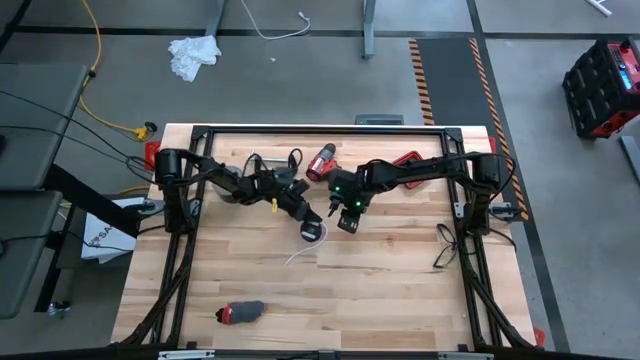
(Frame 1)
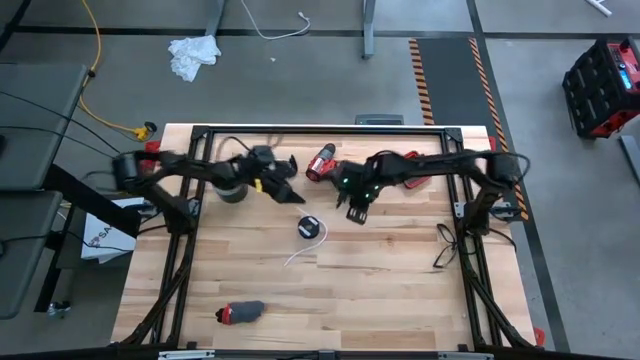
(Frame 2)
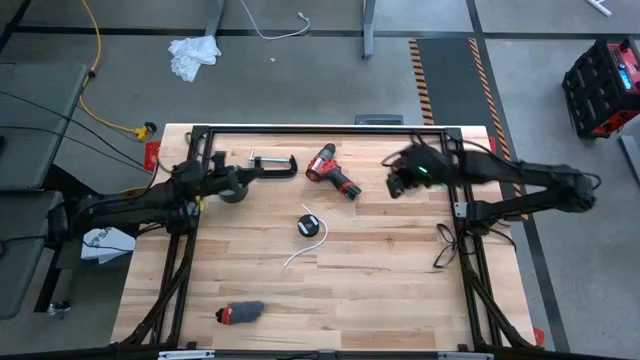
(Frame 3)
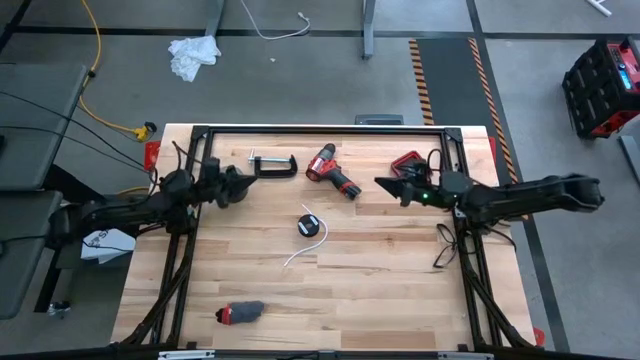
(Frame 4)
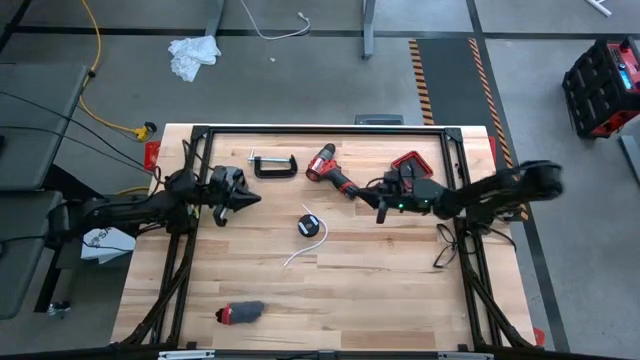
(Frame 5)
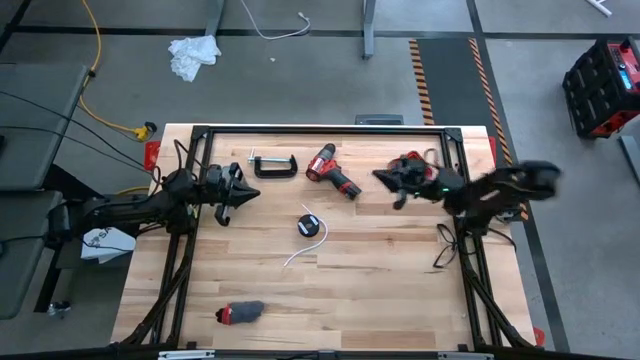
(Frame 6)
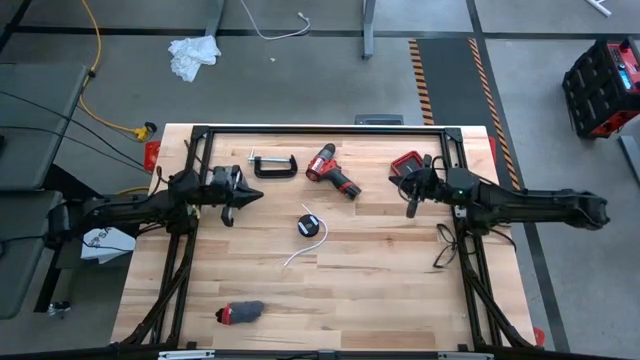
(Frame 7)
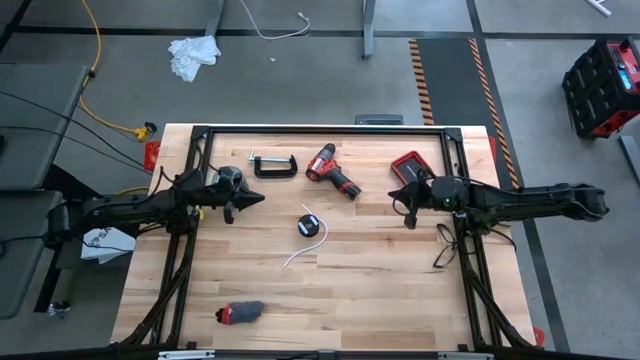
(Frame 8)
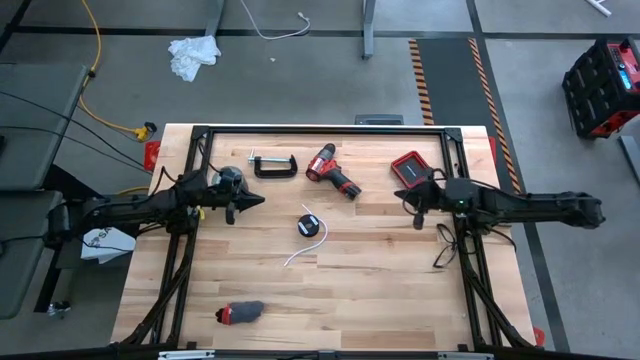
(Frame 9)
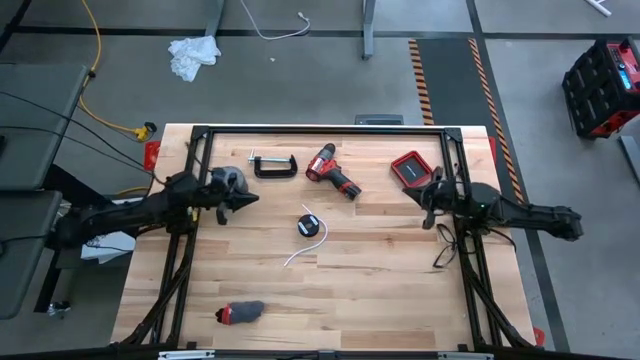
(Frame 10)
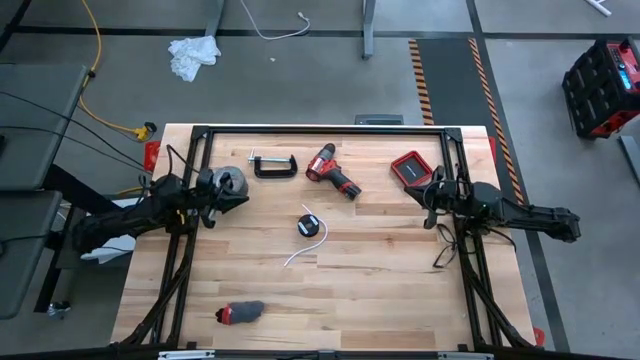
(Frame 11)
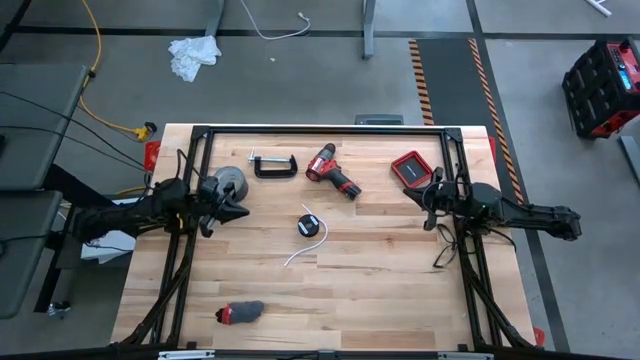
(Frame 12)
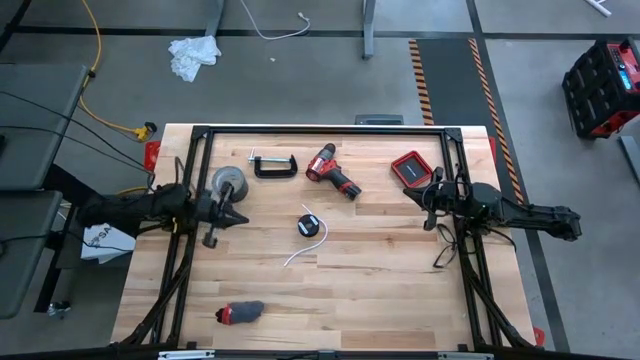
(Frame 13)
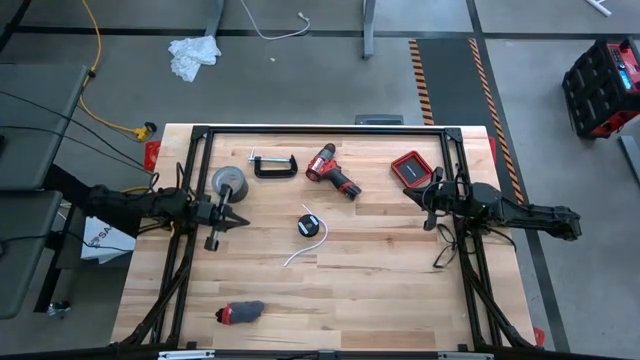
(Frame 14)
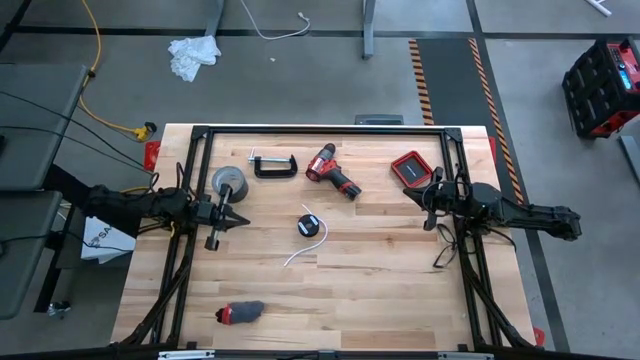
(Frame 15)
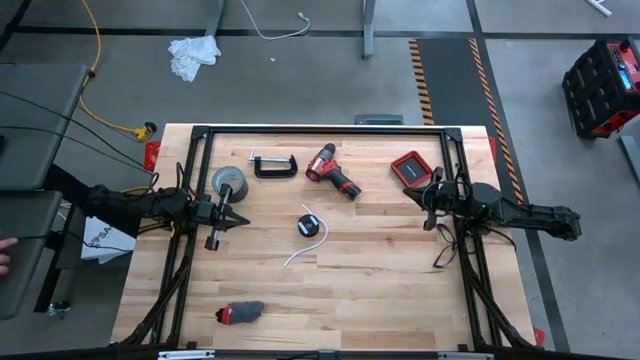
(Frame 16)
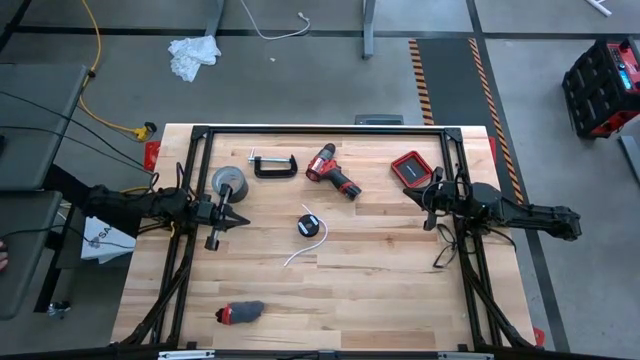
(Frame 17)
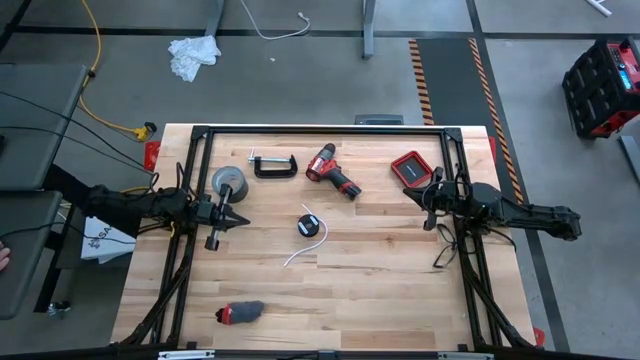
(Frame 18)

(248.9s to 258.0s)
Task: Coil cords
Return to Home Position

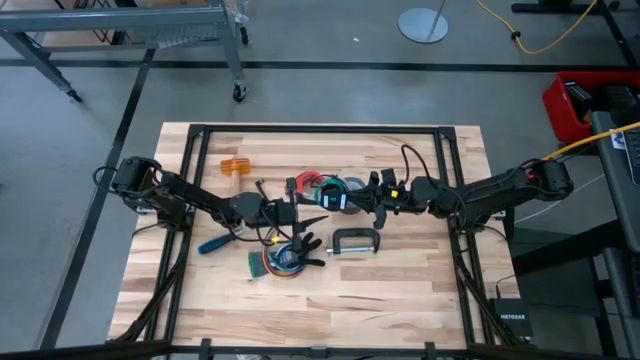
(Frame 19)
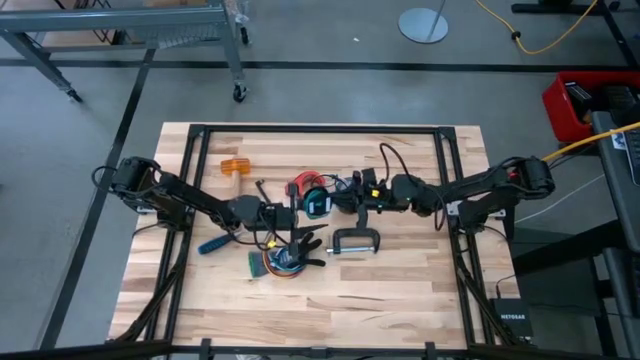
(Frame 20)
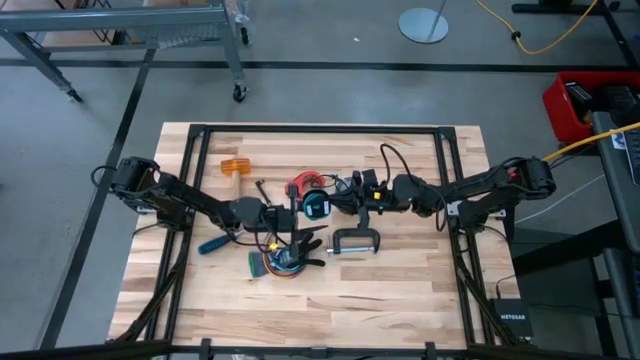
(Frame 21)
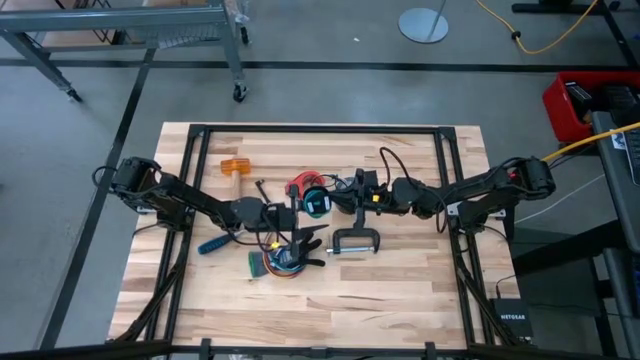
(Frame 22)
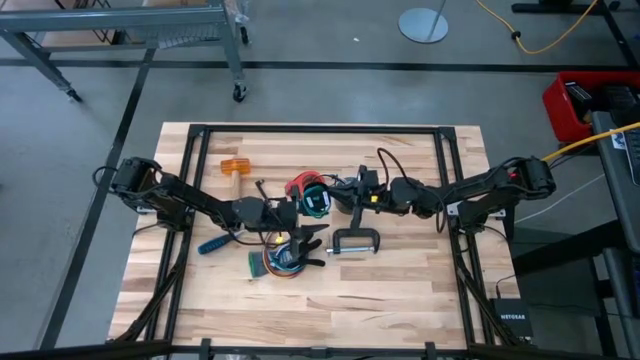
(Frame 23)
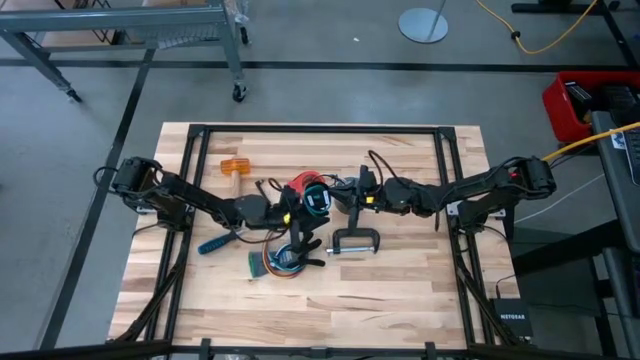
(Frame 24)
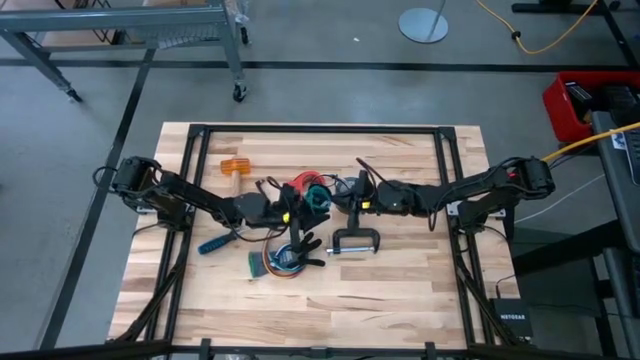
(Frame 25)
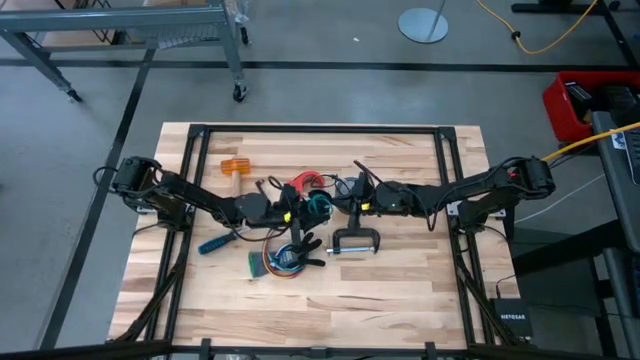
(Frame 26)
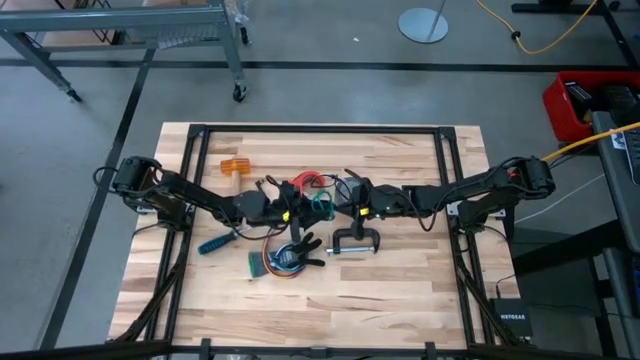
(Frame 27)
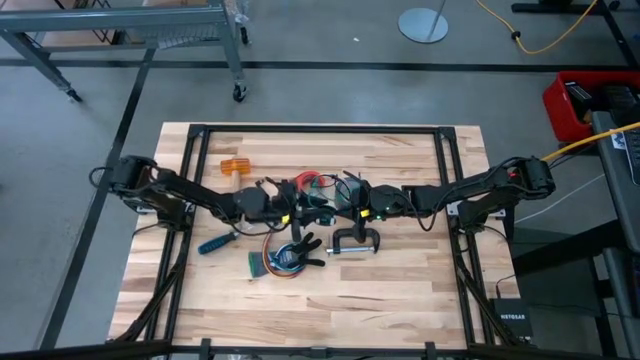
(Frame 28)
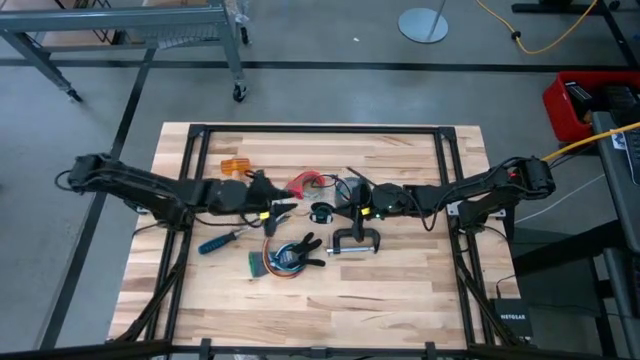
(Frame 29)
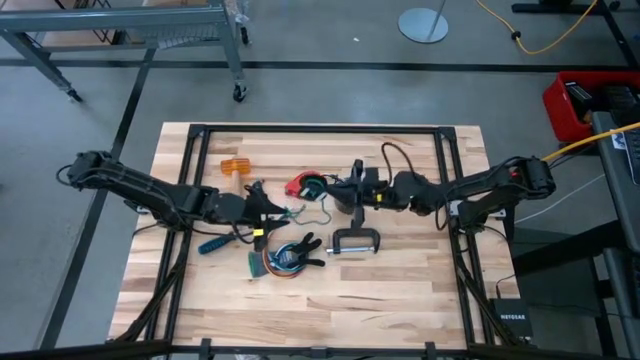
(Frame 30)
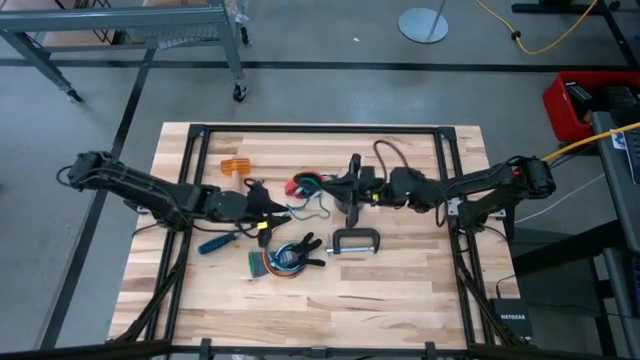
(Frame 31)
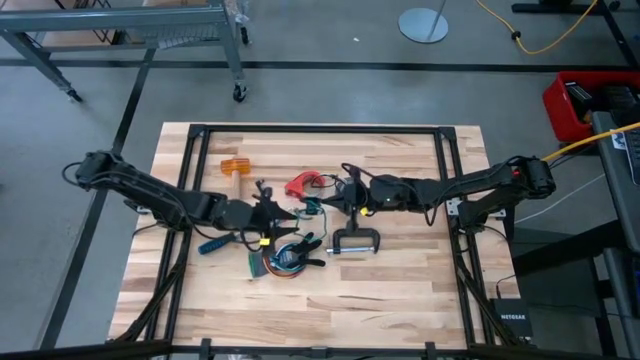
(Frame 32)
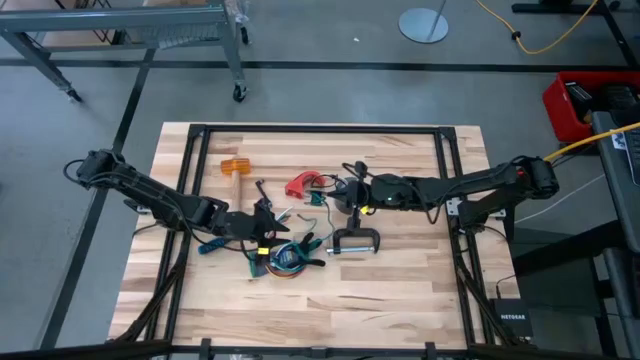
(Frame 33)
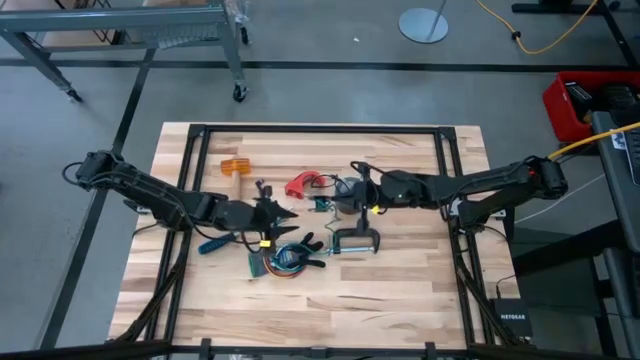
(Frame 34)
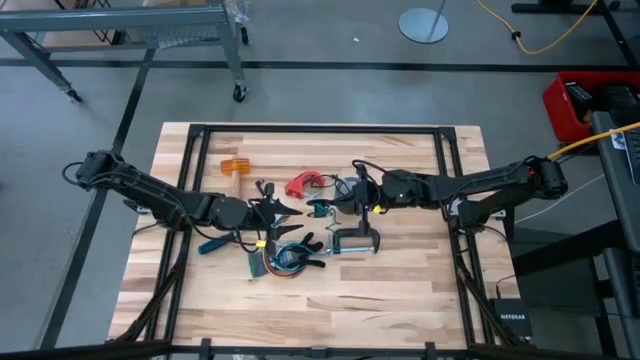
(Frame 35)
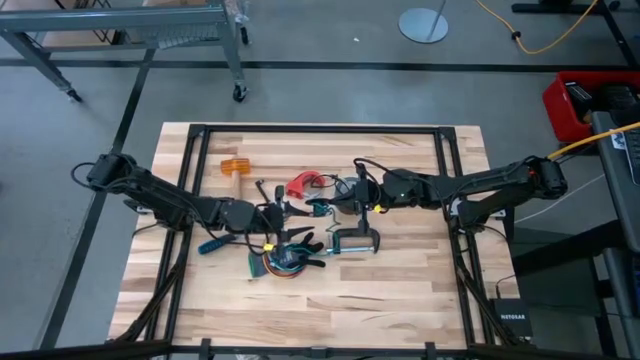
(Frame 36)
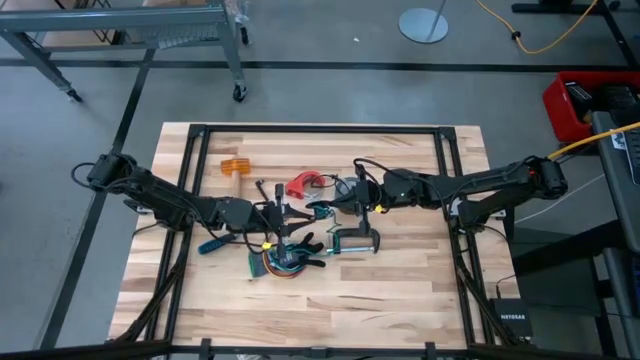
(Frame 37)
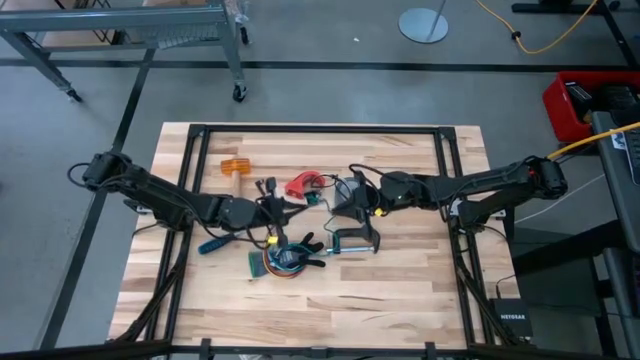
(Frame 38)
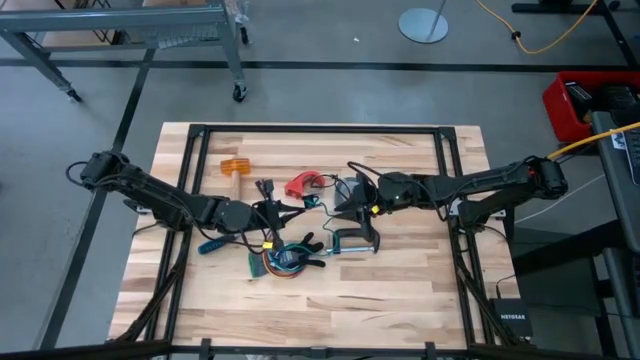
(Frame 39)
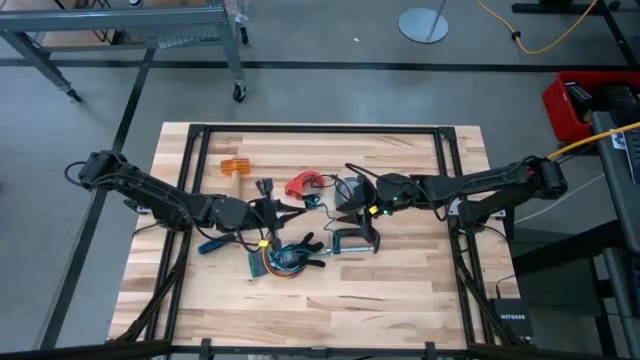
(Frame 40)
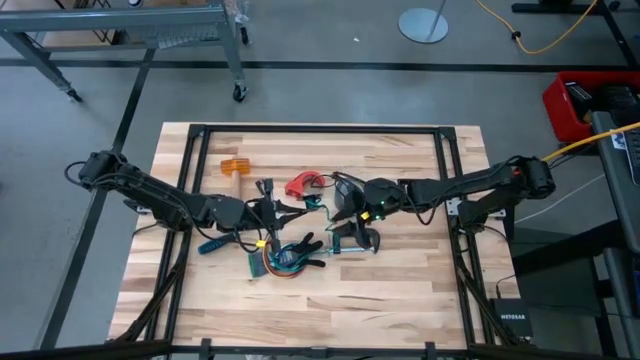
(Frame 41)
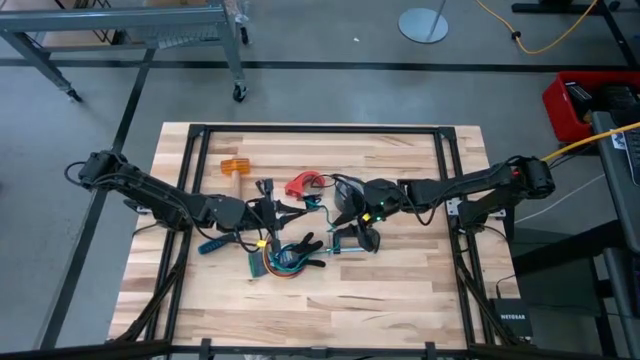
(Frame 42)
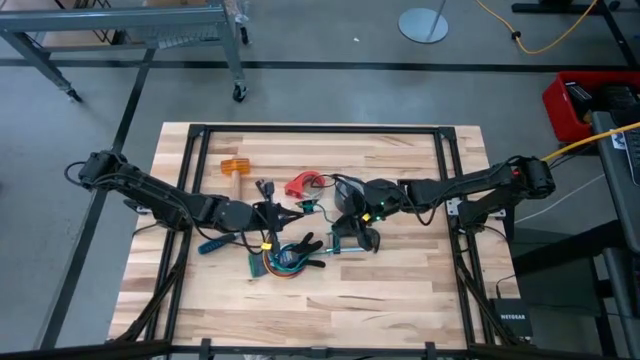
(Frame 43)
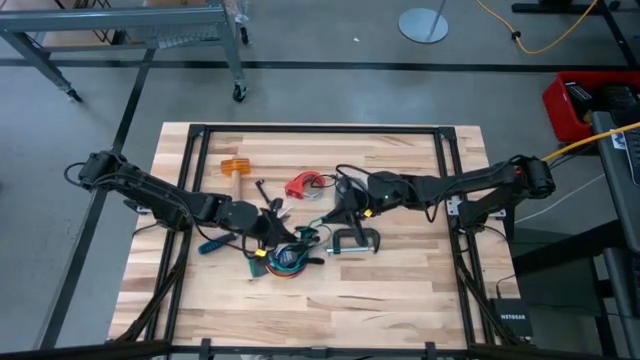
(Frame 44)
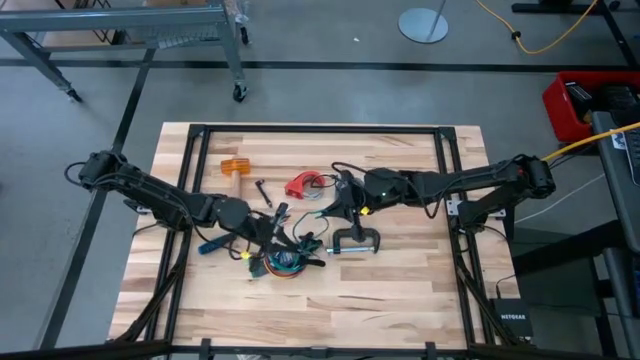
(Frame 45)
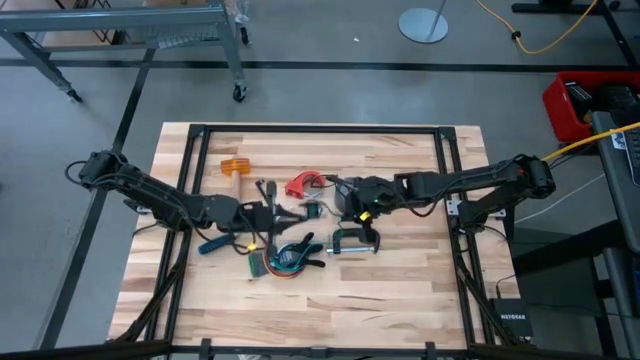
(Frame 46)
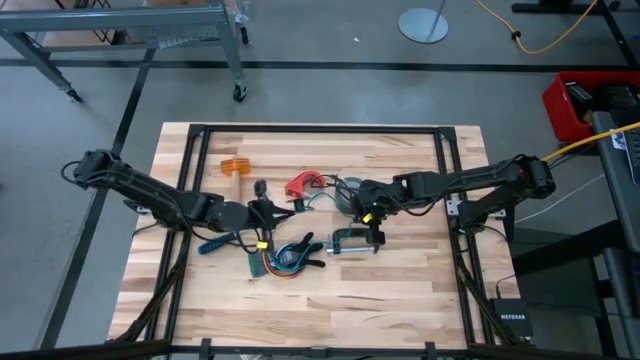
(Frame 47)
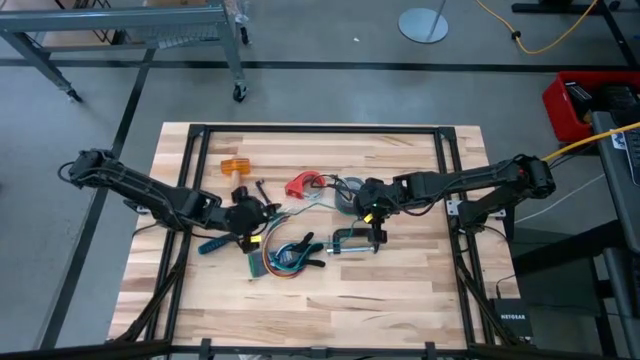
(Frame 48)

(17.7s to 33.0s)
Task: Coil cords
Uncoil the blue wire from the spool
